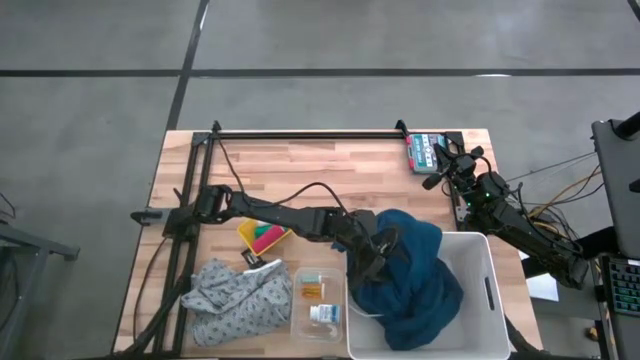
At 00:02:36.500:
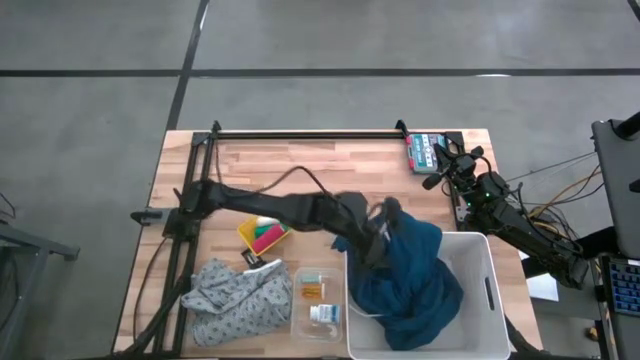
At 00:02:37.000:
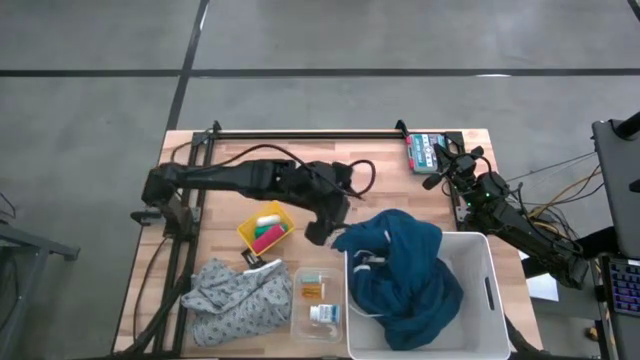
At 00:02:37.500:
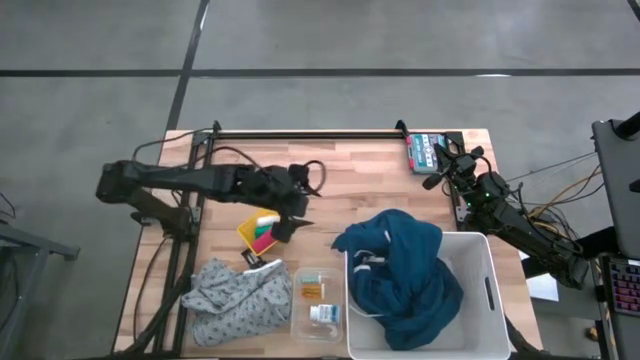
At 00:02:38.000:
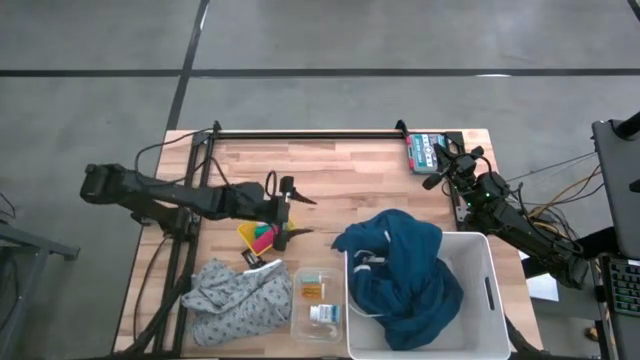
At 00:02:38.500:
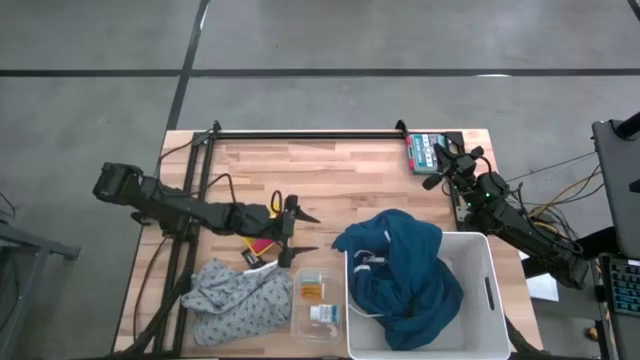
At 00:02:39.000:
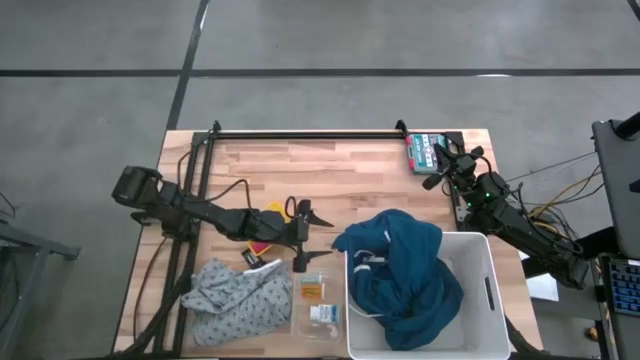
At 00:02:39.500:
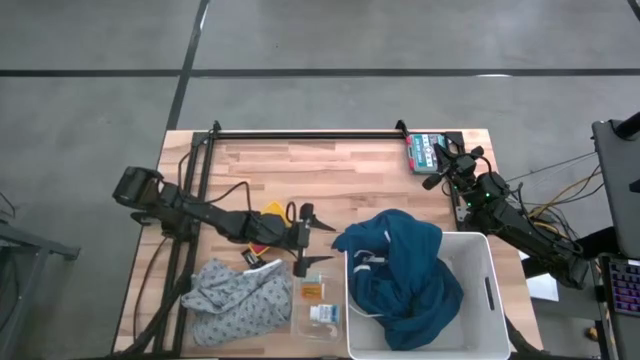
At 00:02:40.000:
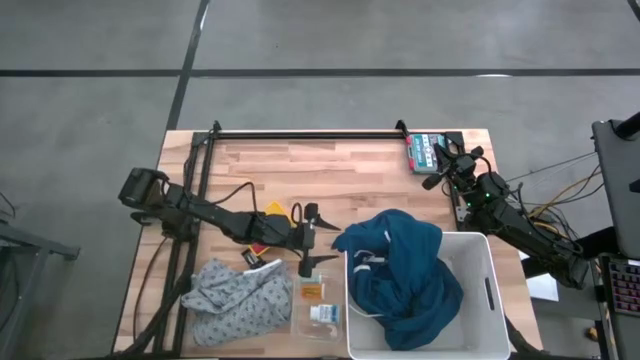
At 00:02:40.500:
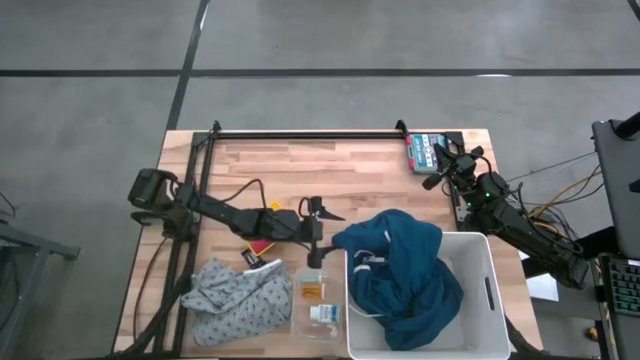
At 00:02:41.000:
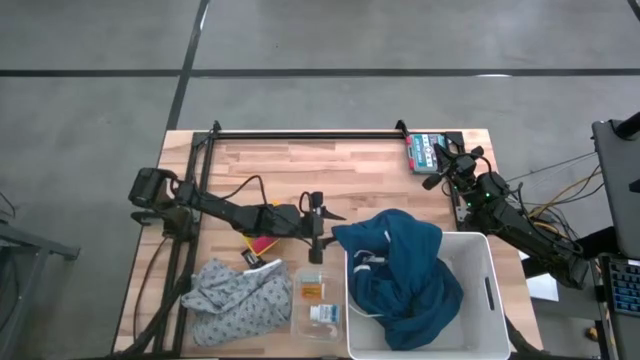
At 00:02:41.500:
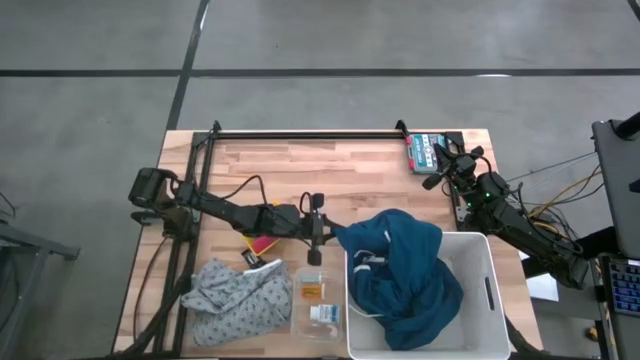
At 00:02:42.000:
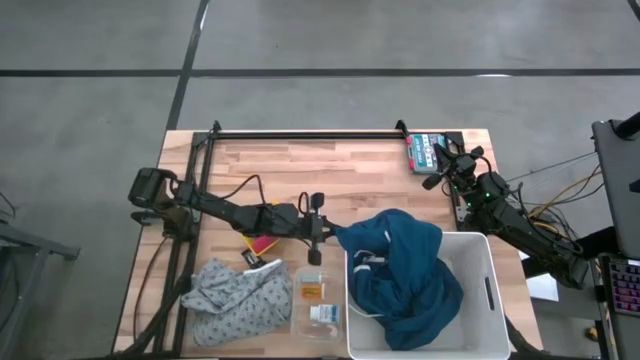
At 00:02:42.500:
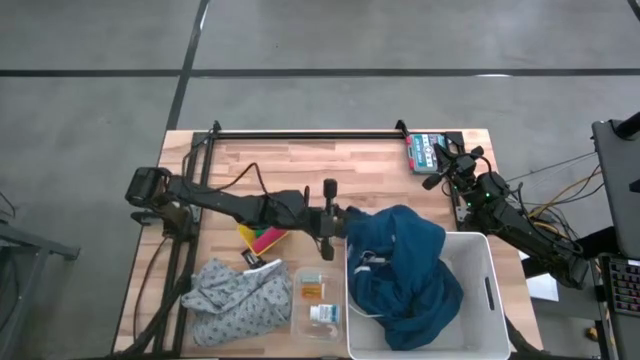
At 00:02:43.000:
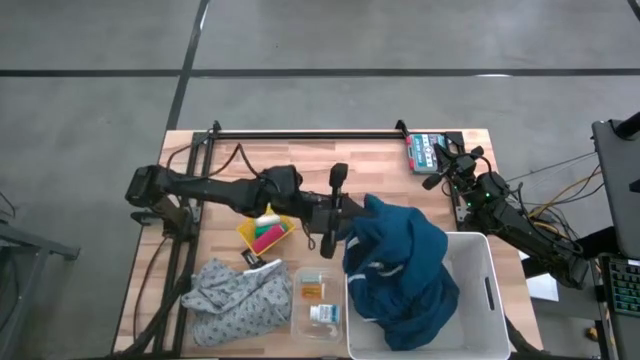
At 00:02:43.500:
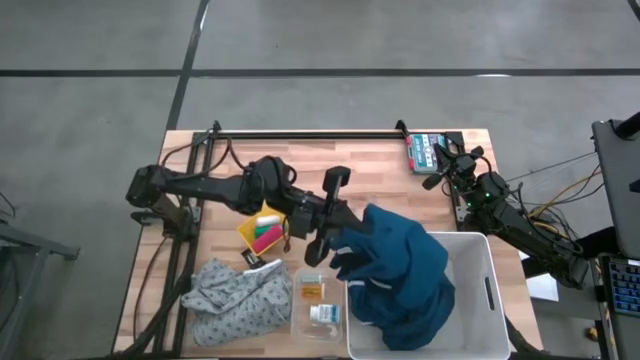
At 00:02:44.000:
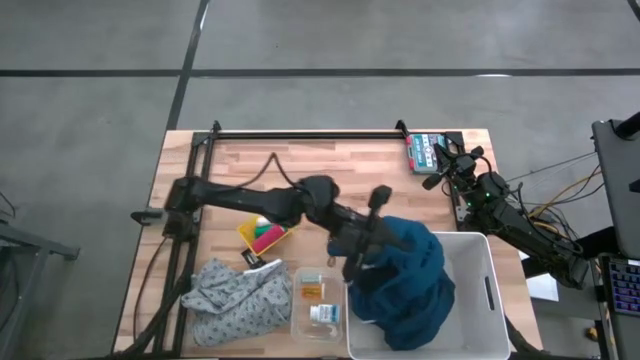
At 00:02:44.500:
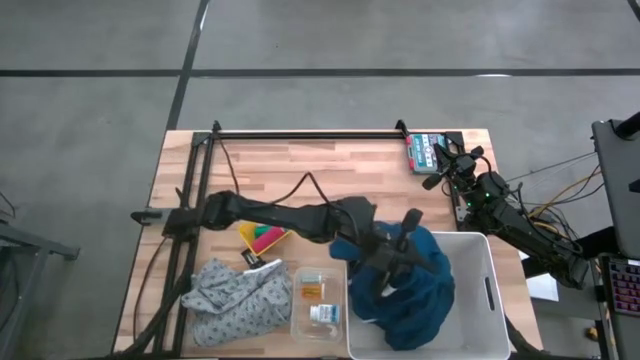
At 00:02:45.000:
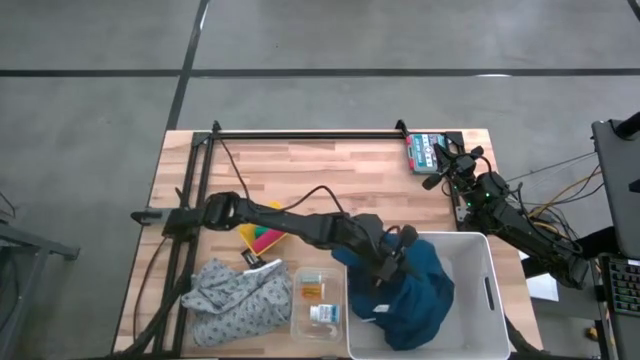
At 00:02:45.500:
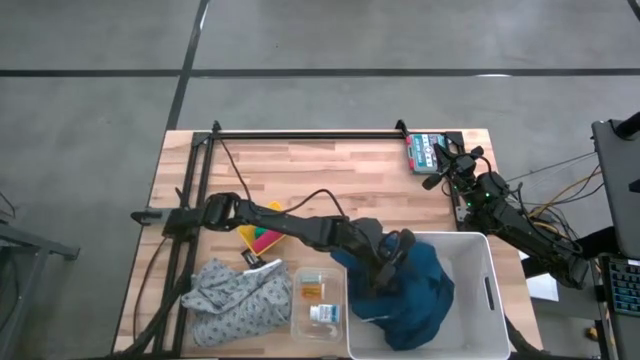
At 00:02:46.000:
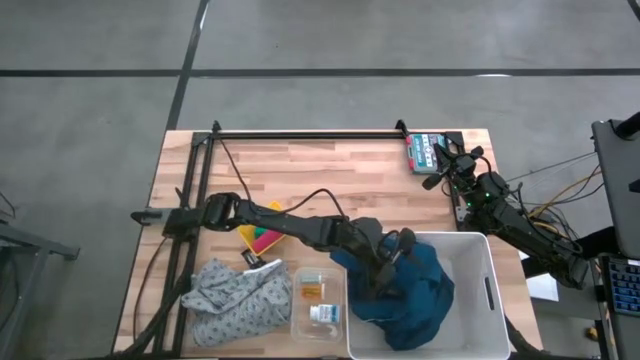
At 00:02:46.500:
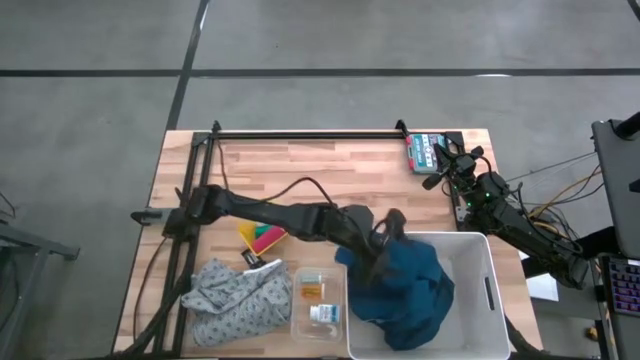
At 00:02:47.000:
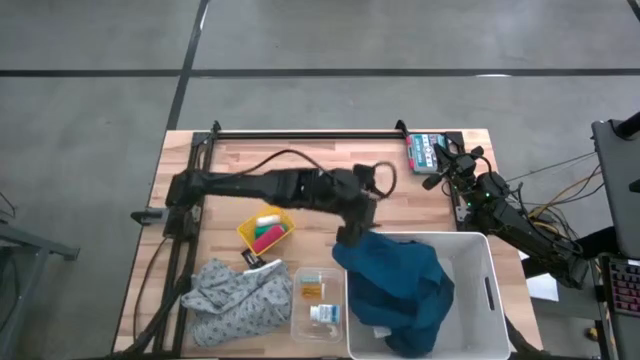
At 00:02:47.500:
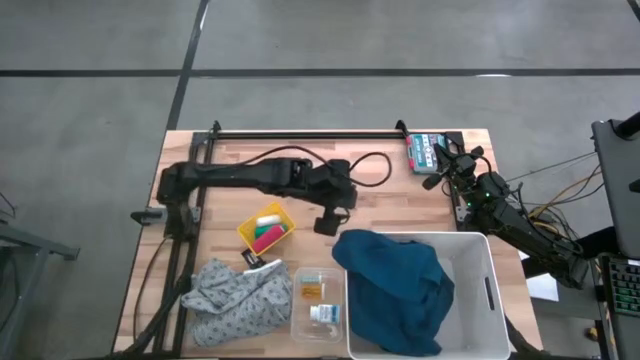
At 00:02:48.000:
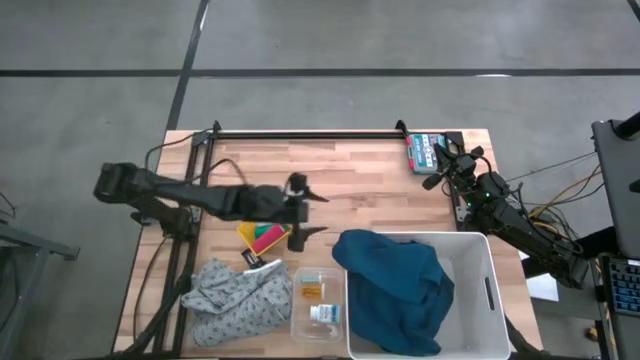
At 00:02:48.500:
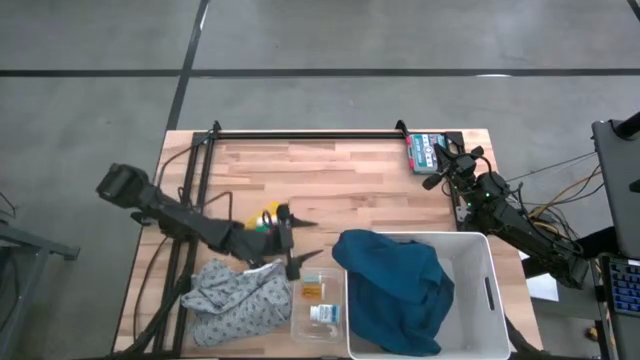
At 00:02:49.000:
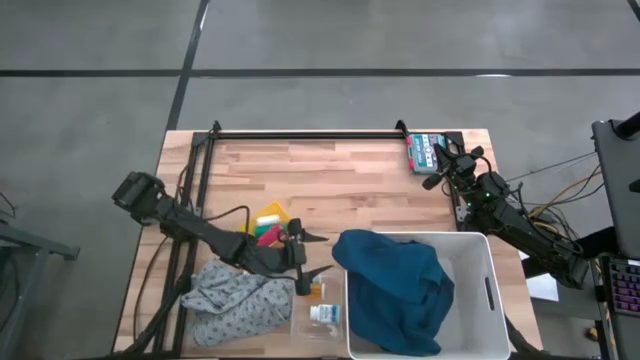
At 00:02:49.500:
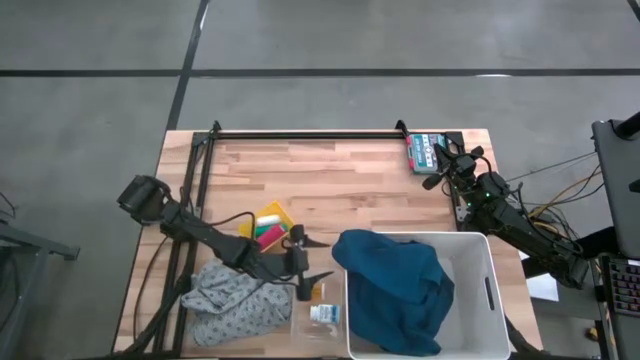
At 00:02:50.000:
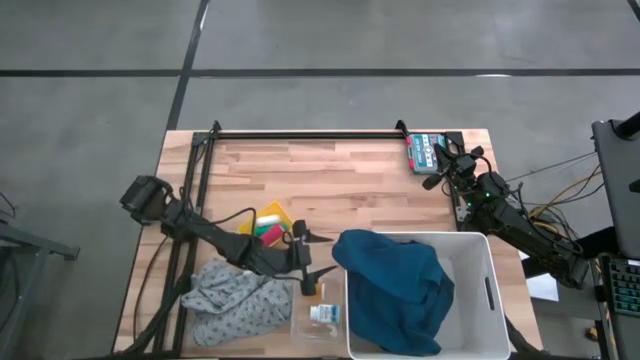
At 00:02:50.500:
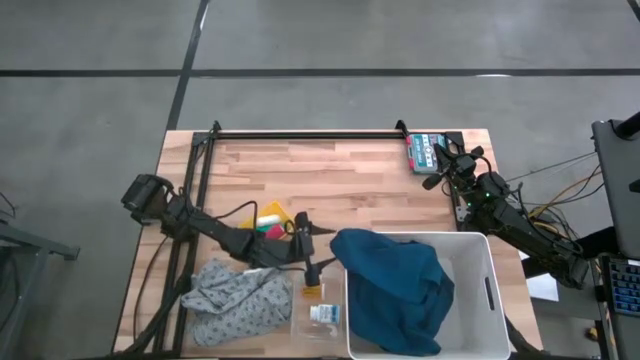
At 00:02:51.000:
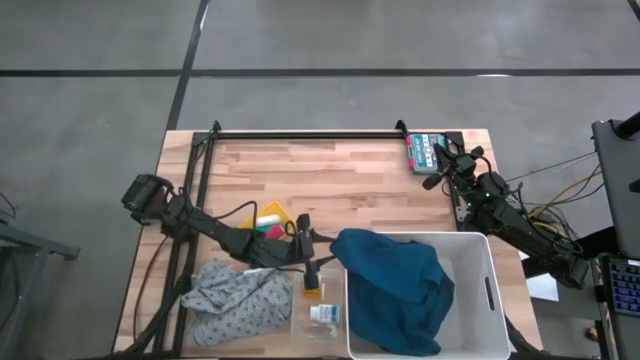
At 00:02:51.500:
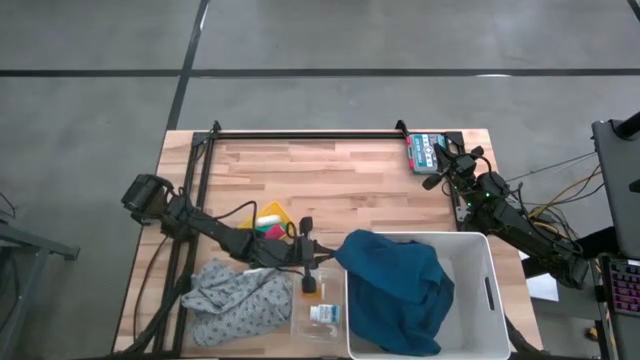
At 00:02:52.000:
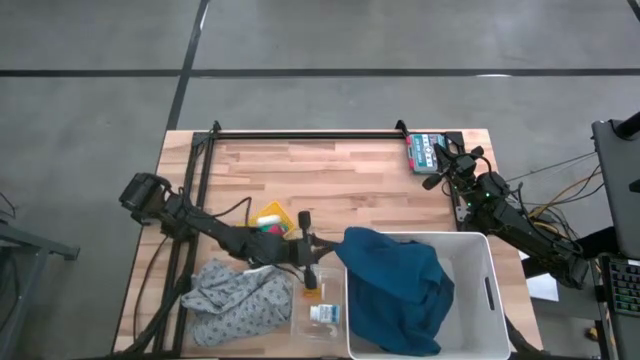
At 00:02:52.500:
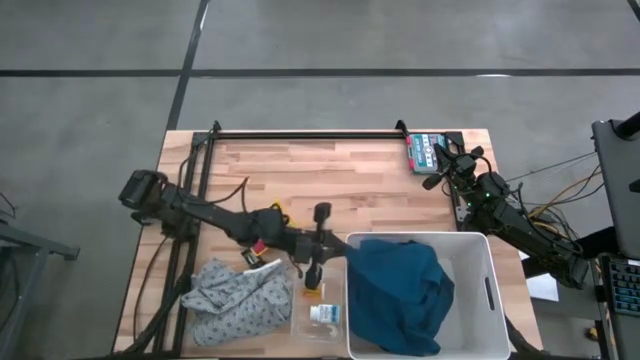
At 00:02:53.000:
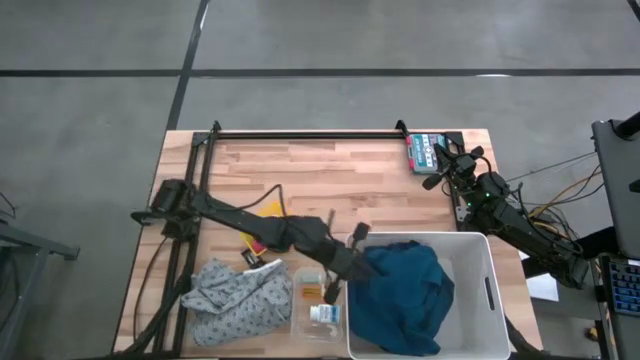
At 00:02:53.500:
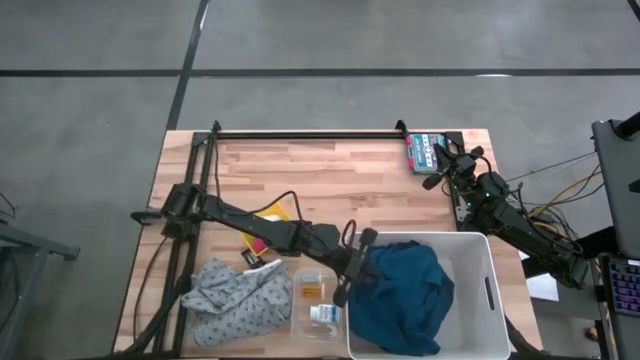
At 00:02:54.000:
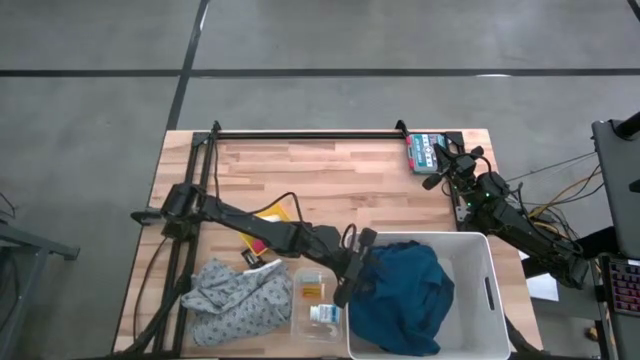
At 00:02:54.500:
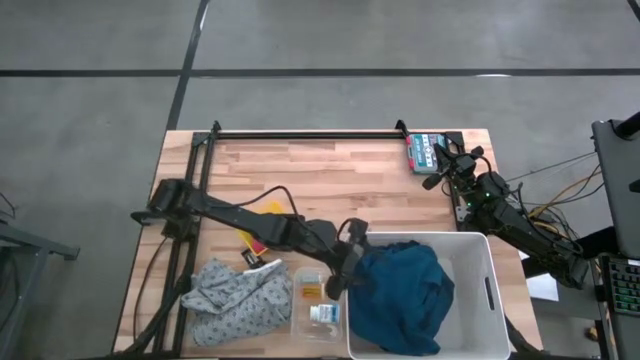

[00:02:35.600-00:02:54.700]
Task: Pick & Place Medicine items
Put the blue patient gown into the white laundry bin
